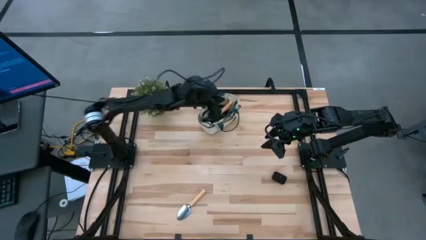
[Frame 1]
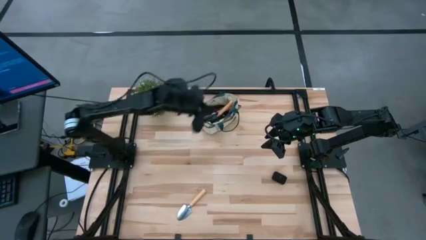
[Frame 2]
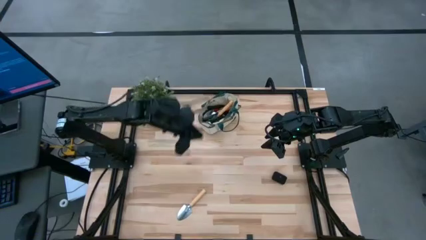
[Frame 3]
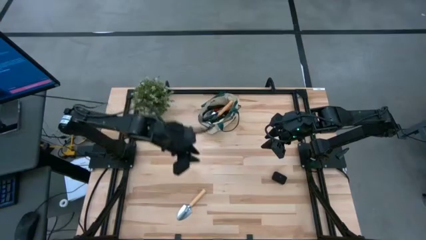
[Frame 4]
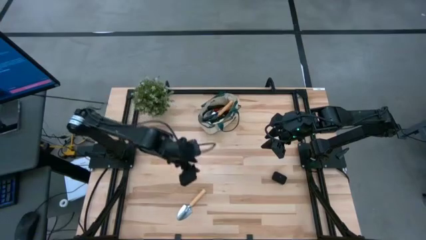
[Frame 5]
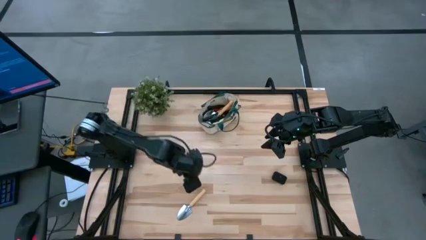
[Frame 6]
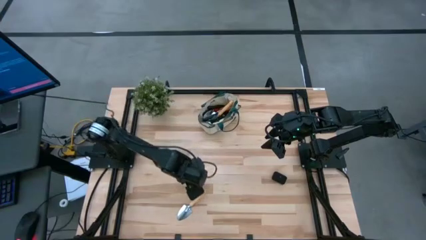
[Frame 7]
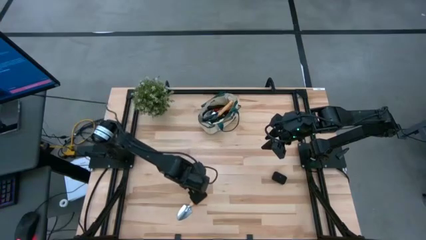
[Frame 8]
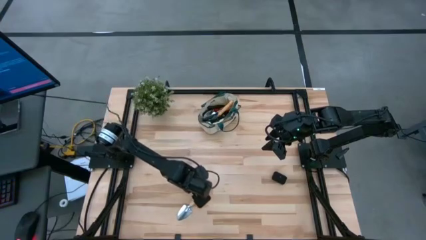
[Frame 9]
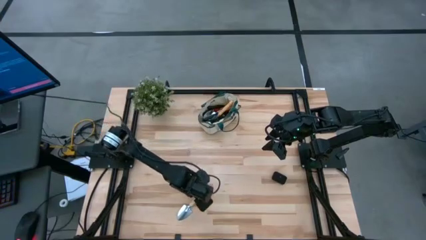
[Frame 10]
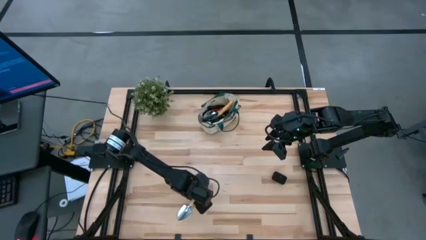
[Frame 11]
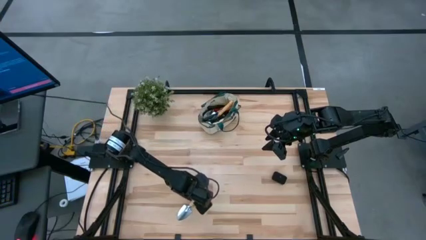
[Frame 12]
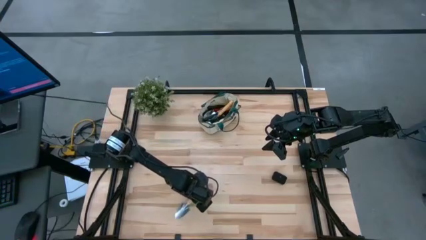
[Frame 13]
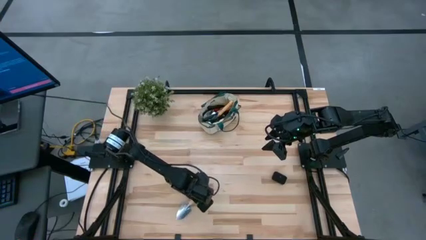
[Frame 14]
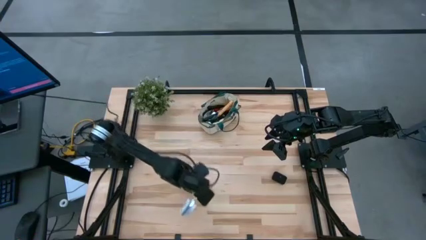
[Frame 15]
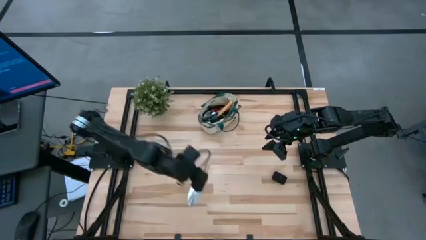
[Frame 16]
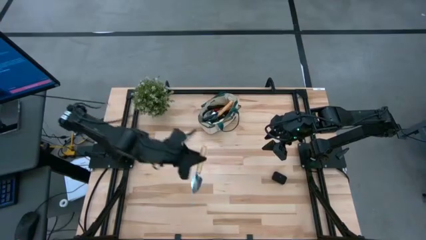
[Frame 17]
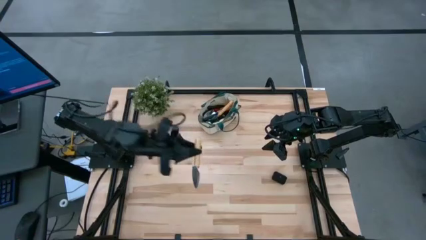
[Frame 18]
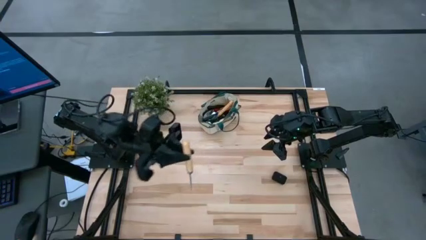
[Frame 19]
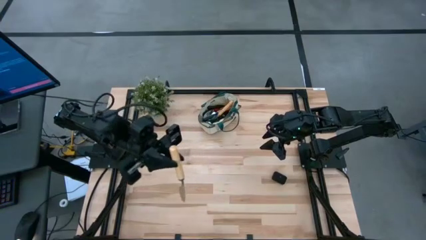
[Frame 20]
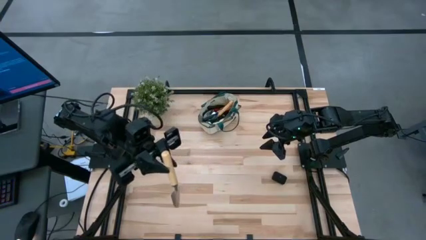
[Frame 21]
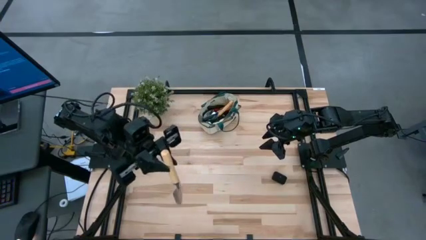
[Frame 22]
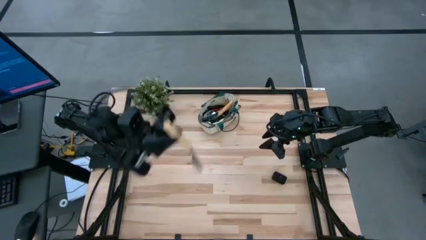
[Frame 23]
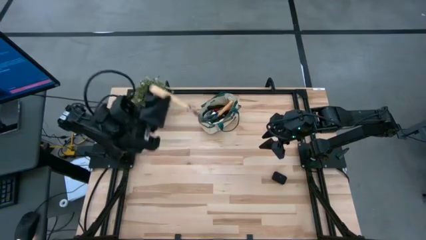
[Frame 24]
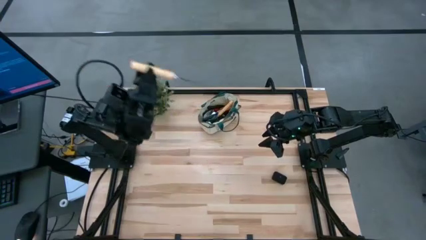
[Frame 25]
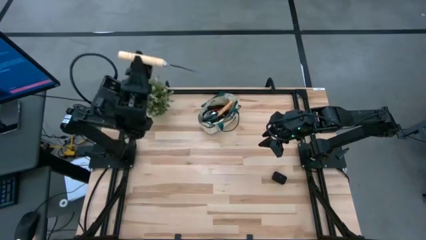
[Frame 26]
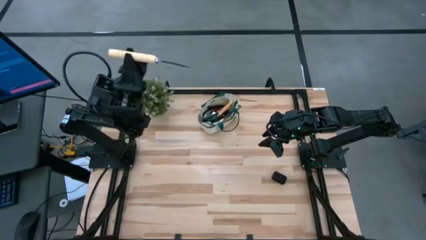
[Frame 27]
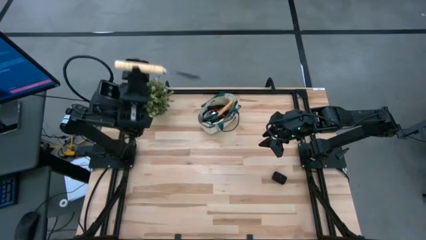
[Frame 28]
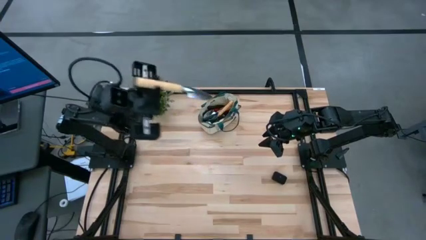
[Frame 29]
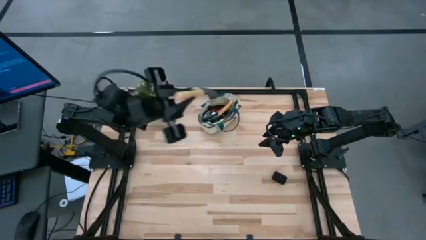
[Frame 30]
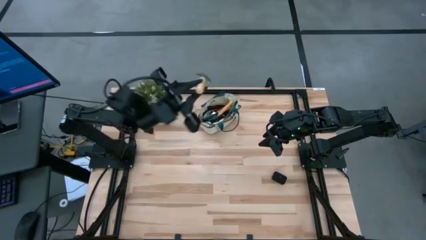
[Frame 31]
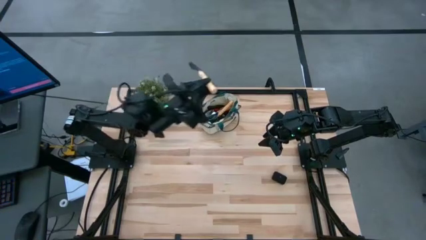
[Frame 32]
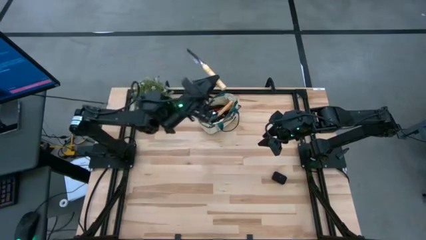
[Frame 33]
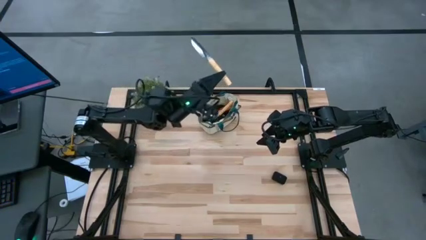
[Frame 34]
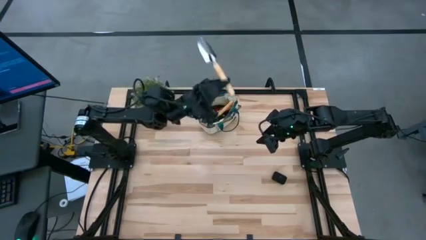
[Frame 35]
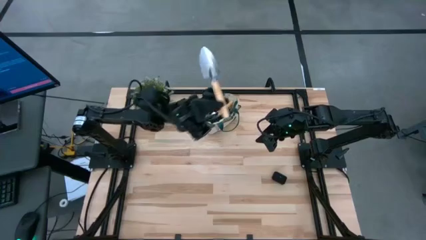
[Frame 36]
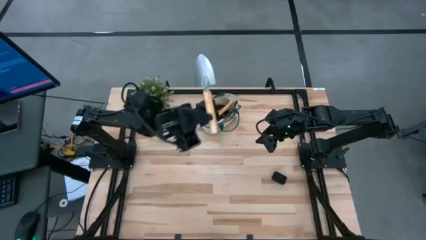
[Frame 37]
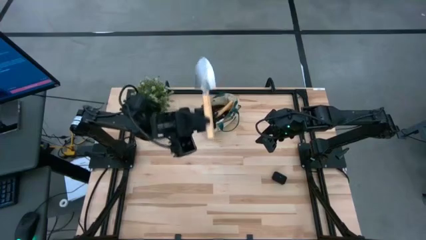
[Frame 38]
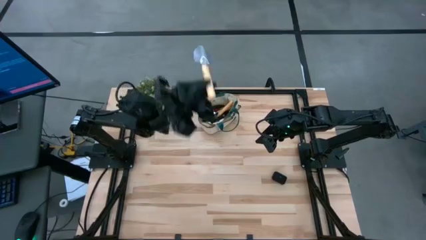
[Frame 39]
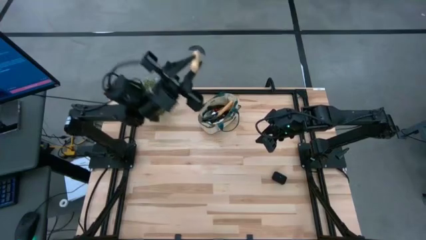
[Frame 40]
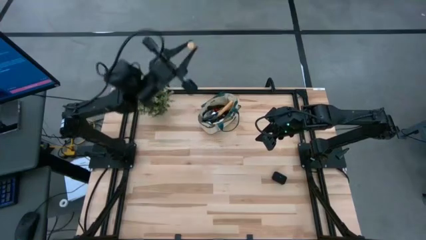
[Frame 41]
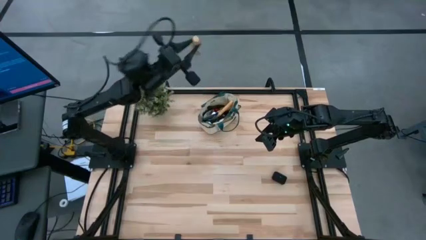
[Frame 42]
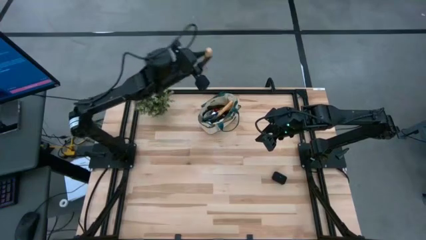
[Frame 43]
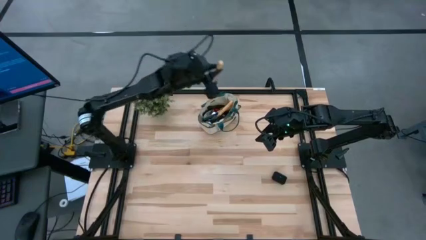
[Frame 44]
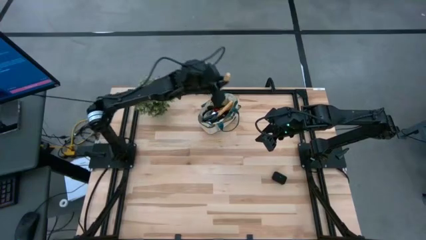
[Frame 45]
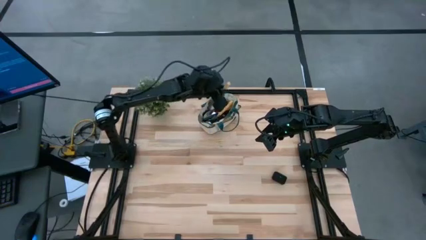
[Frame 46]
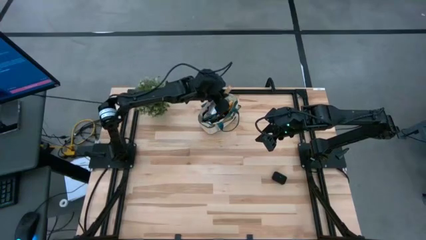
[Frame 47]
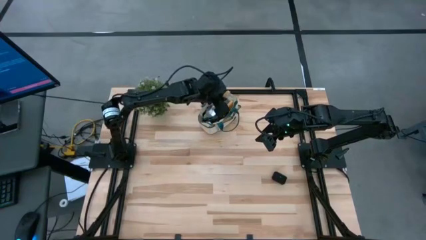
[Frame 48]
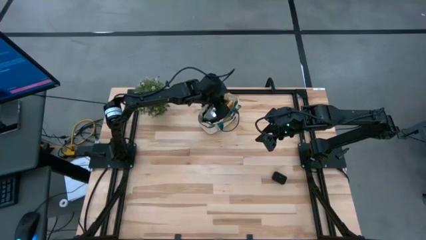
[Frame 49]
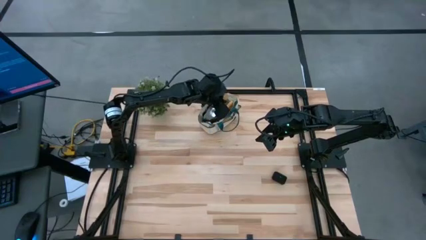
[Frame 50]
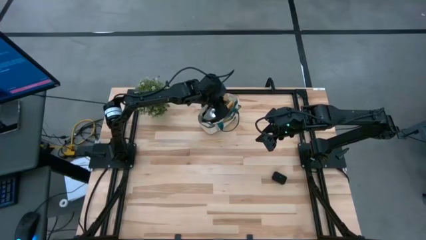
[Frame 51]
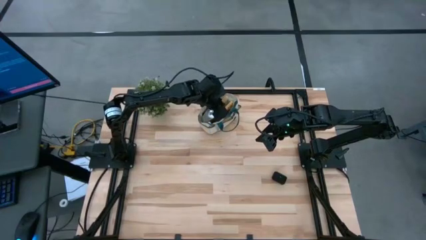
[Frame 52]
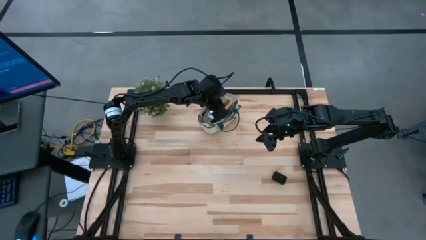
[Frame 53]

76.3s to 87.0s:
Task: Pick & Place Garden tools in Gardening bag
Put the brown trowel into the light brown gardening bag

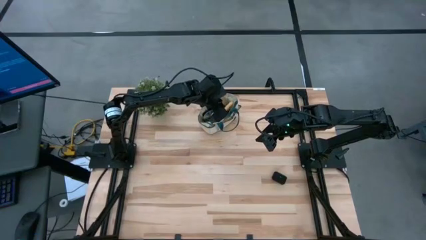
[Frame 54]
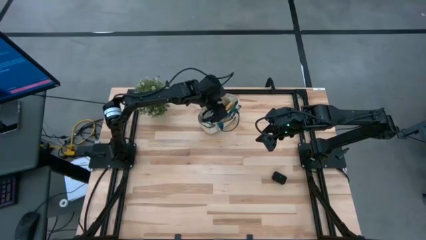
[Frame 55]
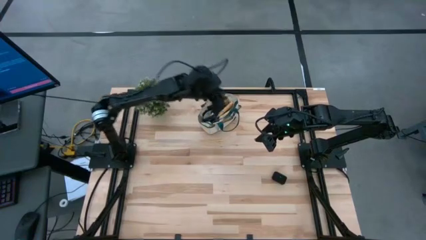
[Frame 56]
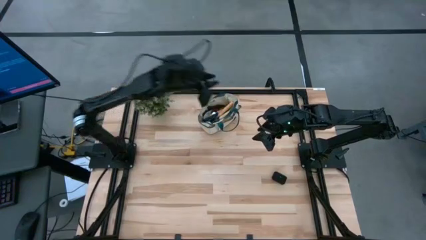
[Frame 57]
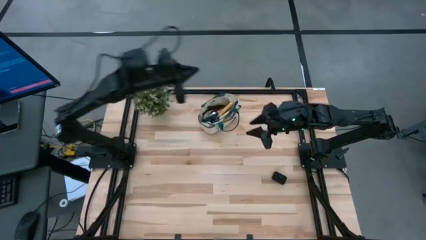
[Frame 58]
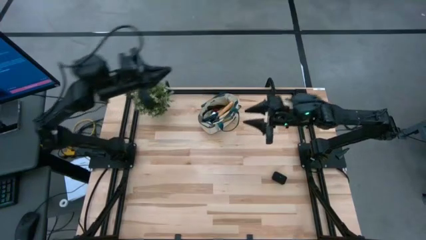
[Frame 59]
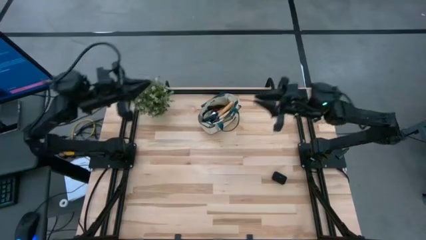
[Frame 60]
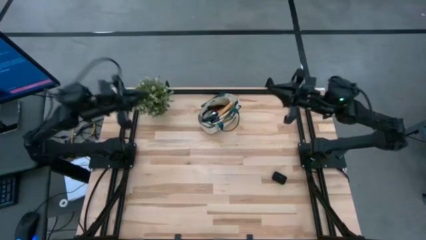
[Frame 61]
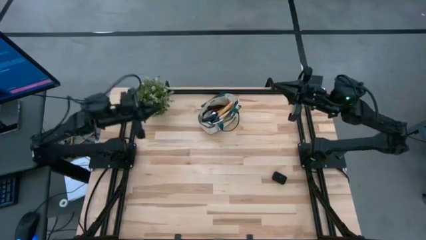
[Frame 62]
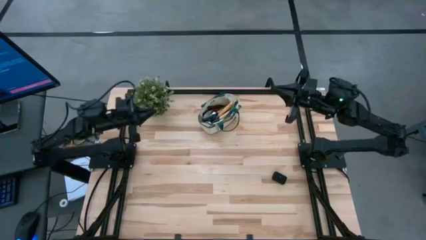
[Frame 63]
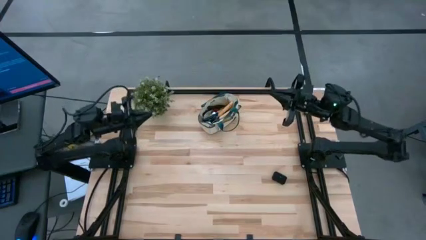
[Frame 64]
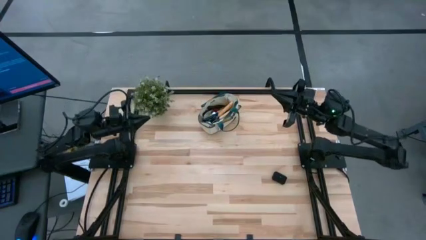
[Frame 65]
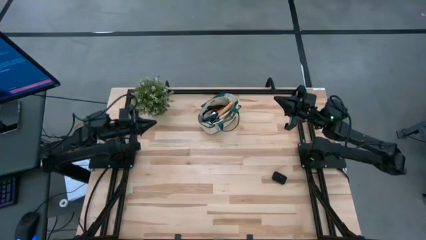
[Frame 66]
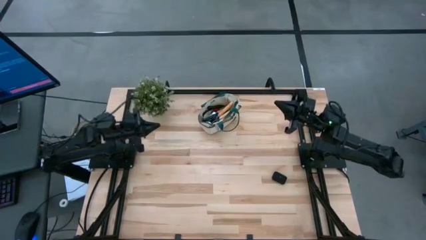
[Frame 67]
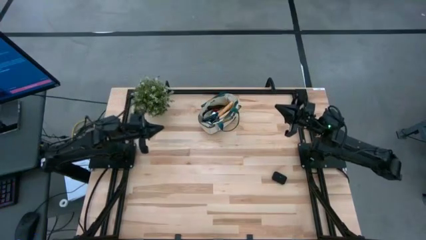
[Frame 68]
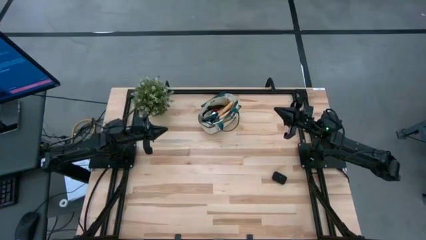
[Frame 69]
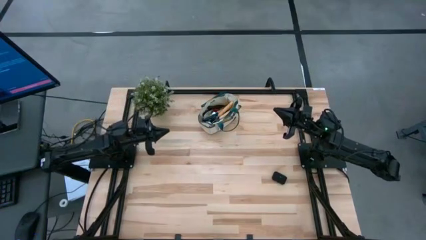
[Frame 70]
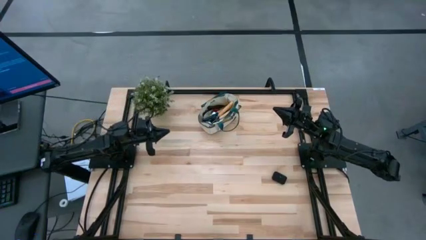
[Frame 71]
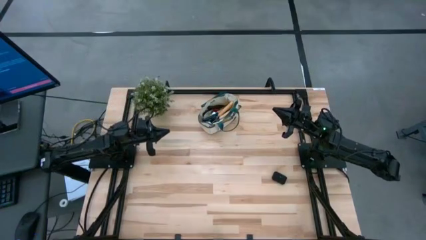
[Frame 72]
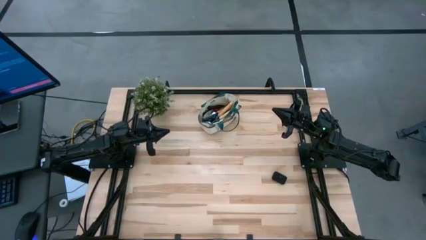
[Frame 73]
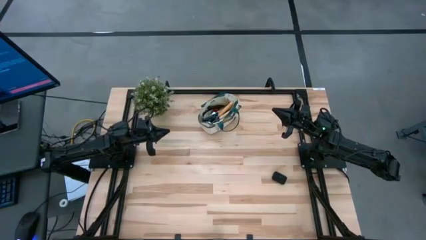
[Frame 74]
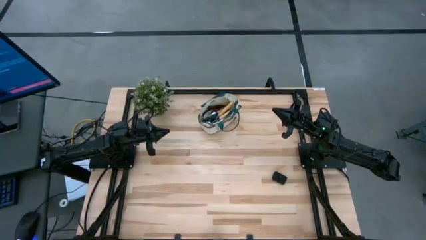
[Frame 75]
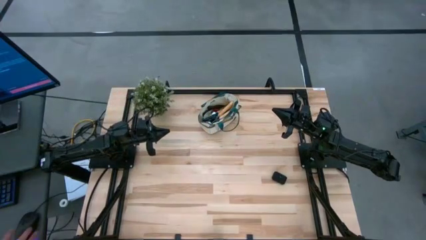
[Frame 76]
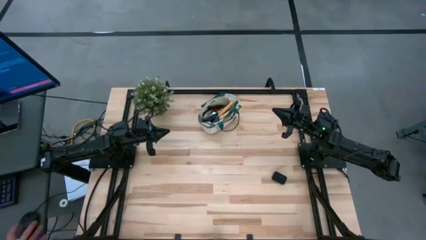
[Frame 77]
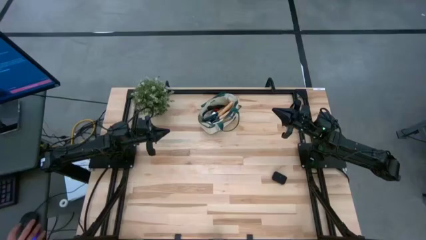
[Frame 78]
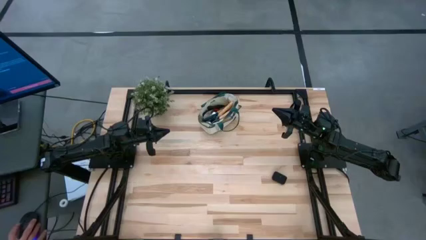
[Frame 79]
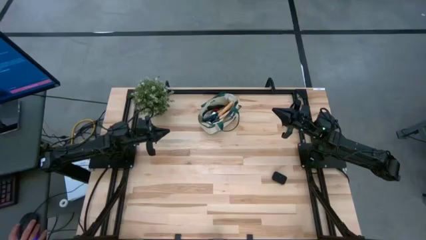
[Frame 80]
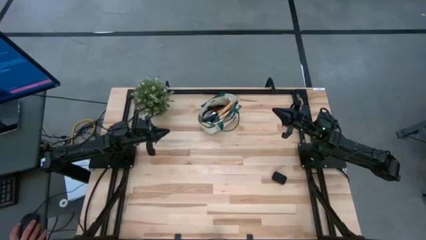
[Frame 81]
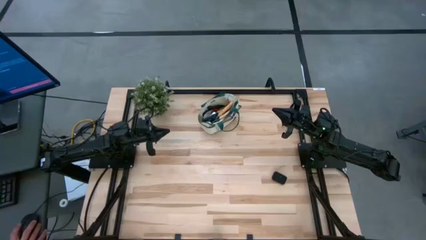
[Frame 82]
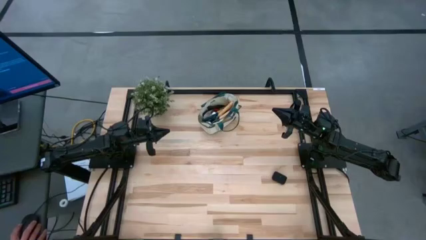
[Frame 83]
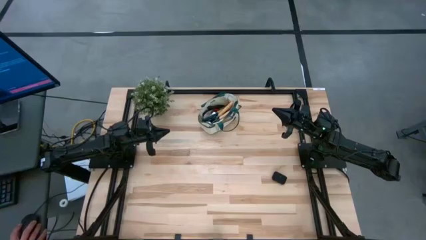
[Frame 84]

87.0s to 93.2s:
Return to Home Position
